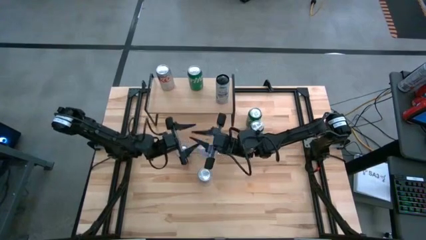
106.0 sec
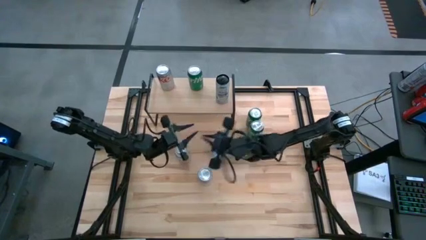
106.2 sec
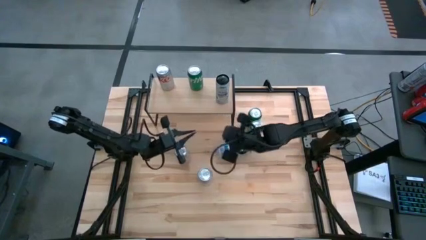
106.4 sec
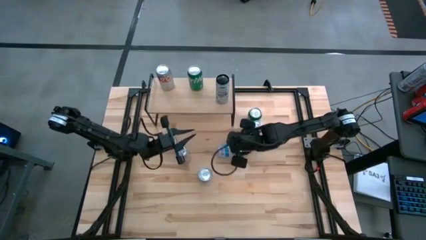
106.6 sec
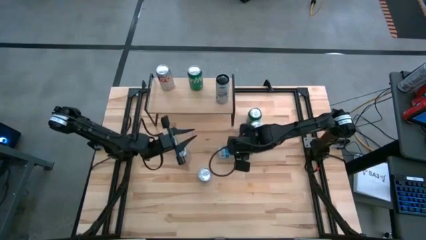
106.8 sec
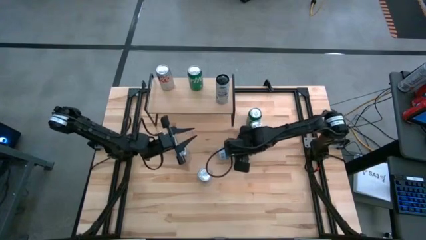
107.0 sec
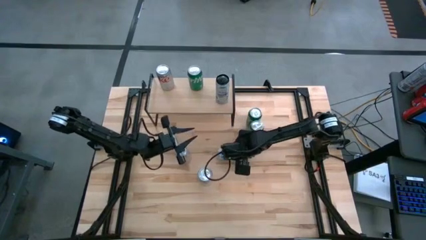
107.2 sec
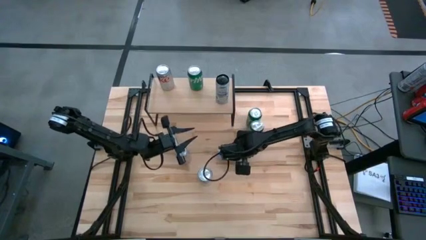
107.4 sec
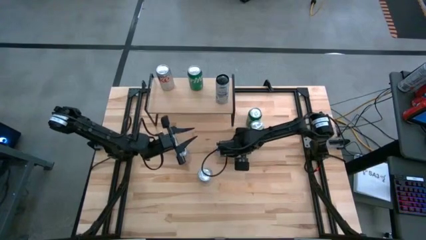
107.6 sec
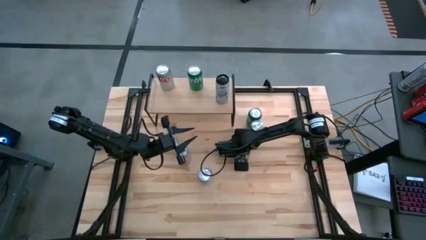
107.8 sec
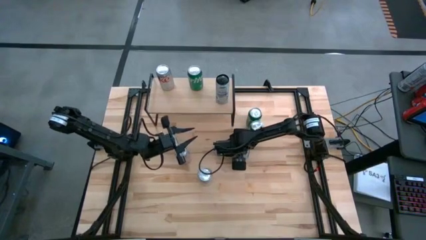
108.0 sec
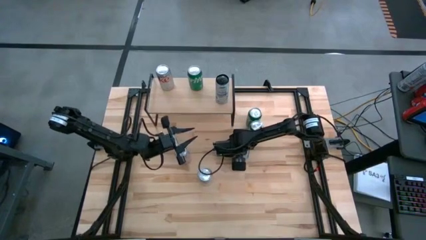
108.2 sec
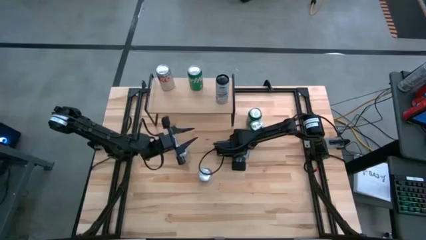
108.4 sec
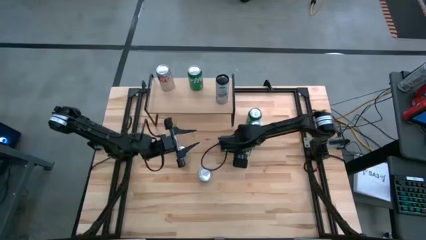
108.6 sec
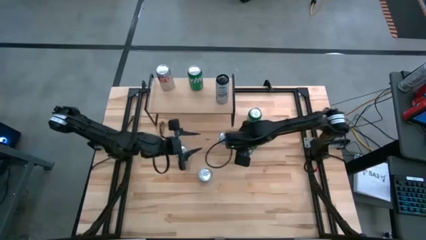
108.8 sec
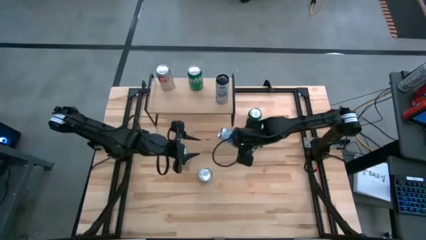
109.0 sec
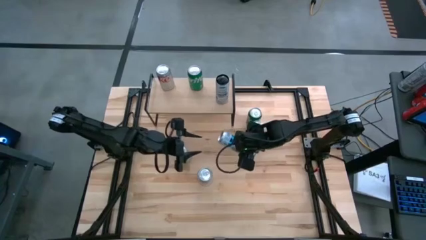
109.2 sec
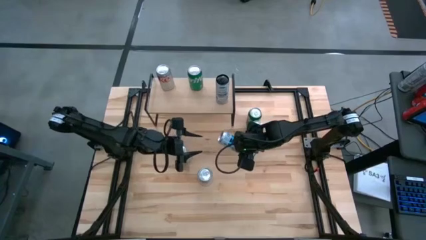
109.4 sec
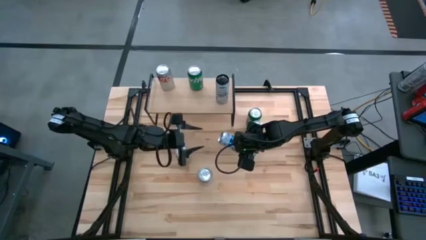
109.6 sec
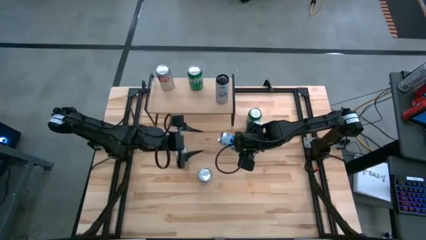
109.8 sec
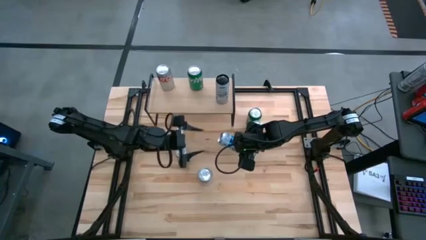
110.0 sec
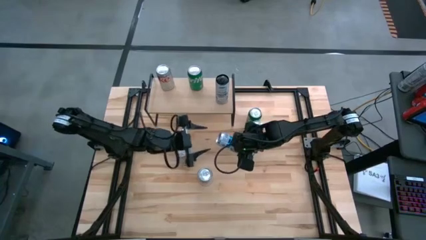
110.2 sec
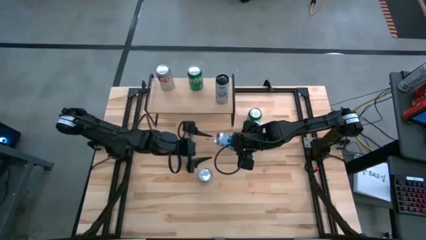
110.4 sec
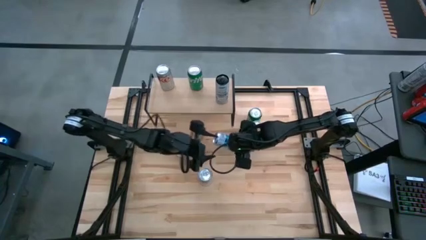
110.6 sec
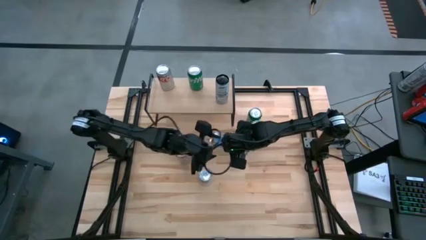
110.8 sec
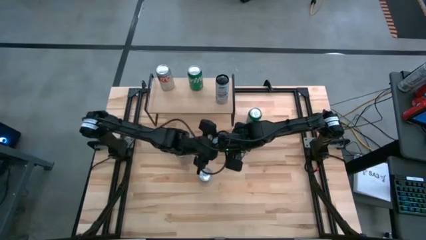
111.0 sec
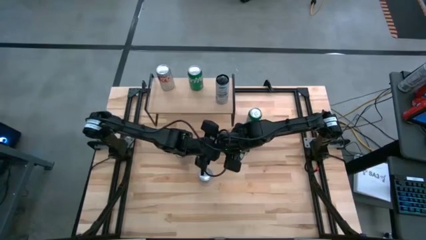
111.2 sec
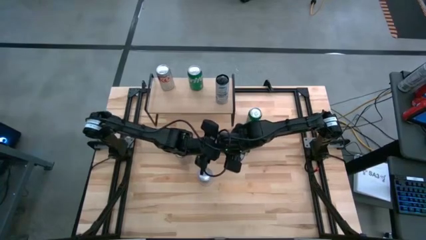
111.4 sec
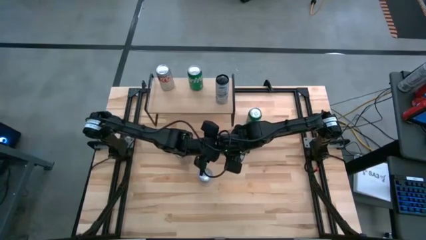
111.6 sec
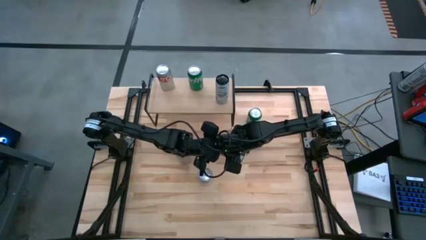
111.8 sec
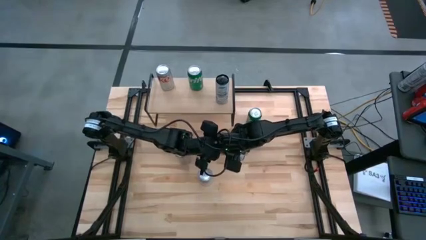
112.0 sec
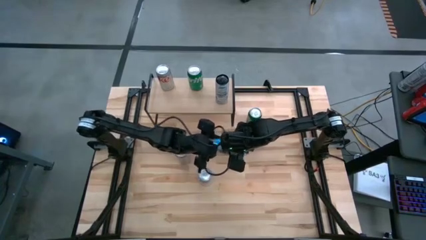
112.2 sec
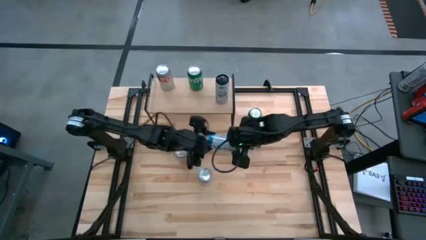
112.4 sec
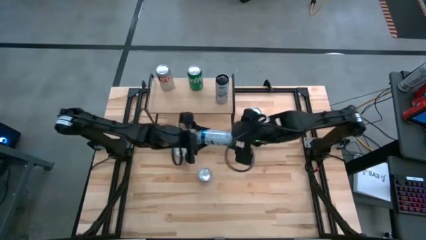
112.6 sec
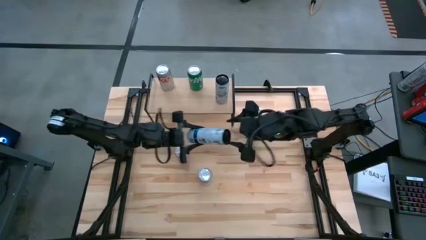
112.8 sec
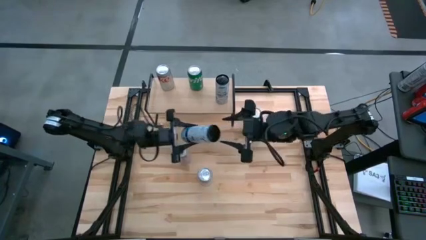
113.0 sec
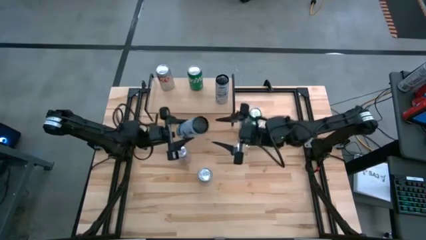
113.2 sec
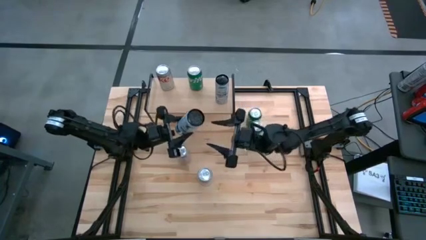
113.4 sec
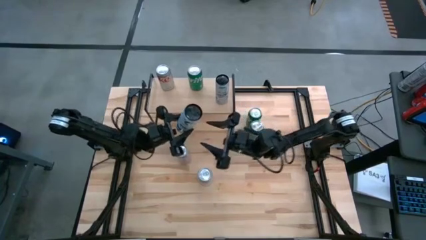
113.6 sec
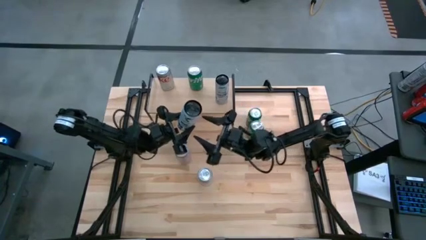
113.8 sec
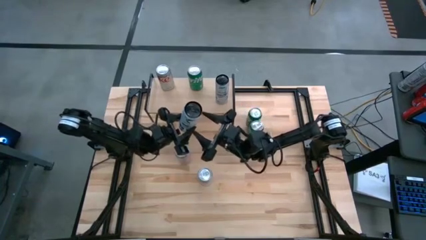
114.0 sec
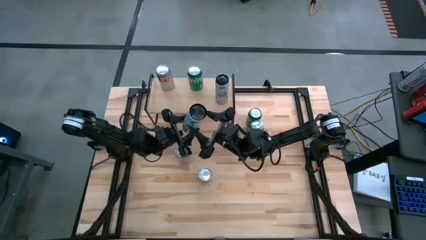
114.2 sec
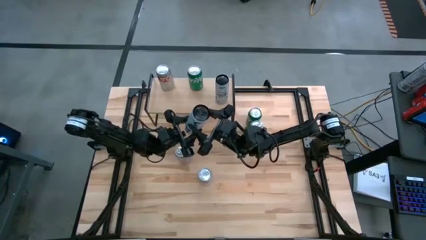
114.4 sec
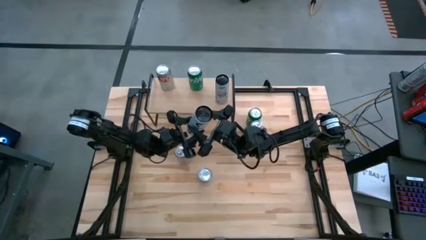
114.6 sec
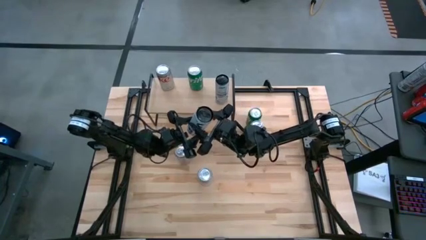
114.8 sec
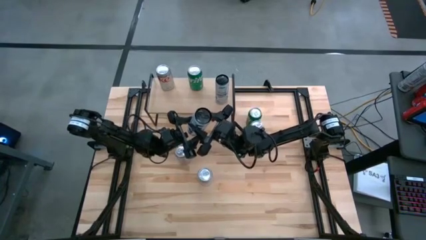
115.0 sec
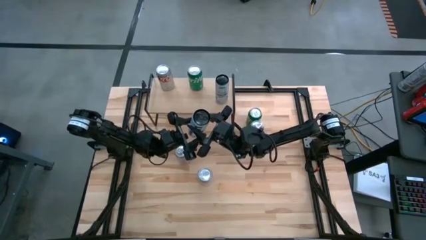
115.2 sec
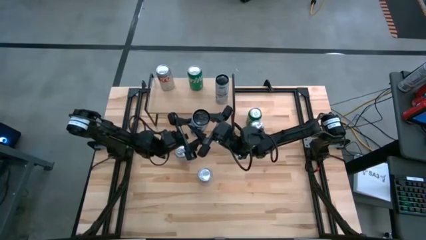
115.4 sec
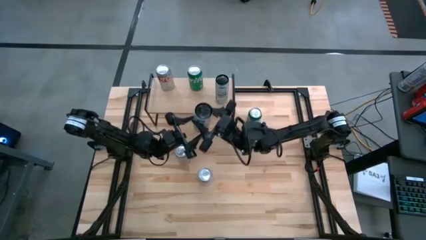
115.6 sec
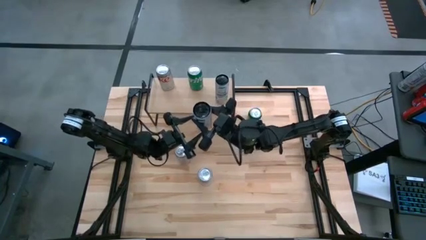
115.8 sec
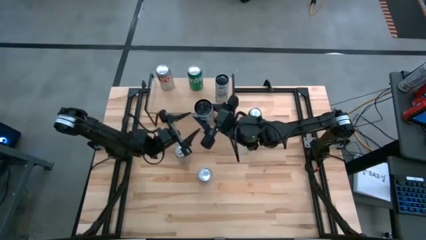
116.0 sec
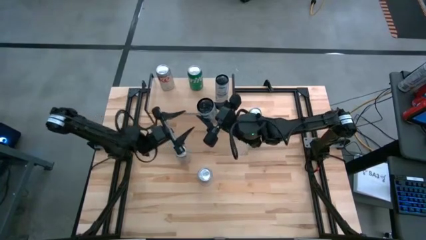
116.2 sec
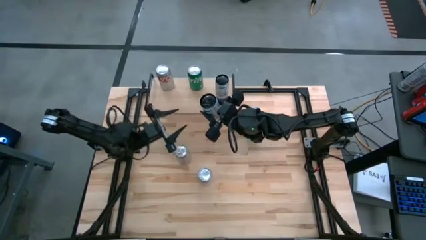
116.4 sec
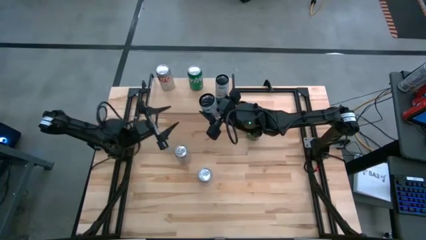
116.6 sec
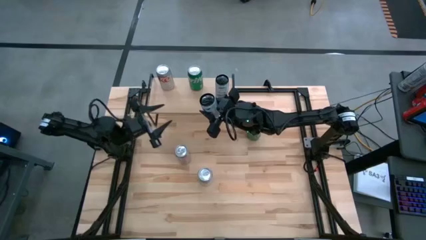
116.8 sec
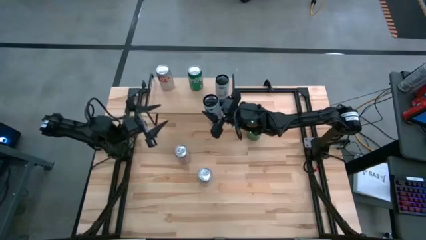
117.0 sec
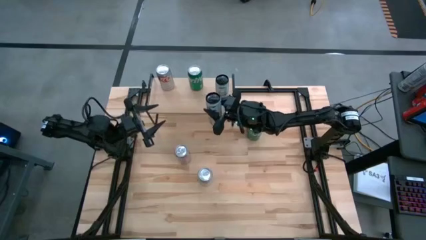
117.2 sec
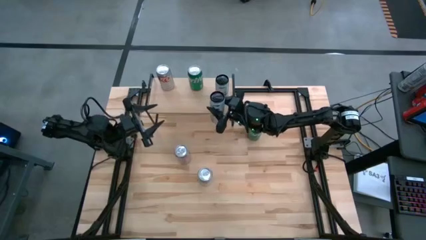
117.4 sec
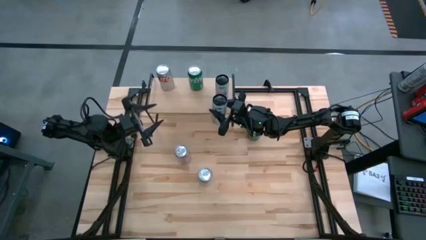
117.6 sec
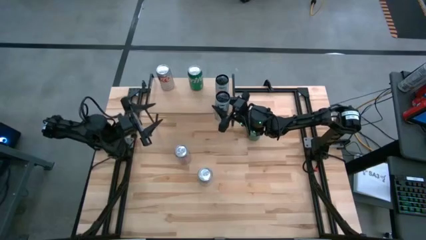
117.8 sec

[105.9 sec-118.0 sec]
Task: Place canned beverage on shelf
Put the white-blue soda can aligned with the other white-blue soda can on the shelf

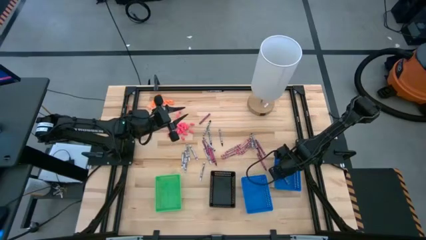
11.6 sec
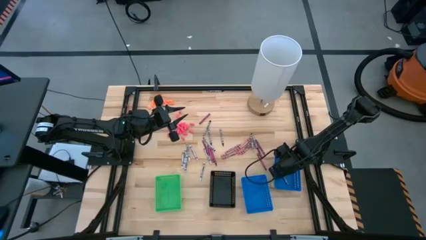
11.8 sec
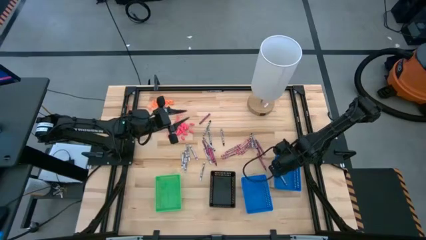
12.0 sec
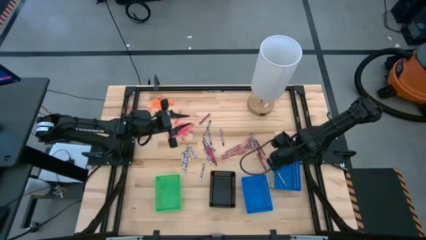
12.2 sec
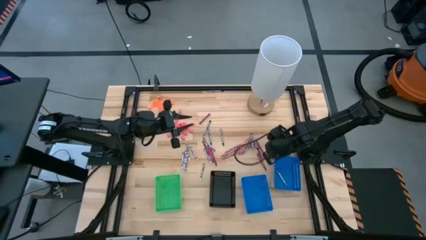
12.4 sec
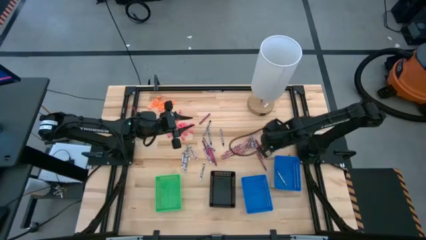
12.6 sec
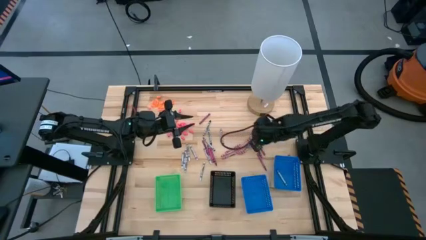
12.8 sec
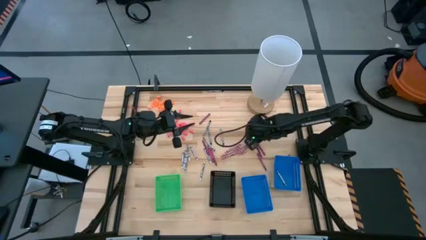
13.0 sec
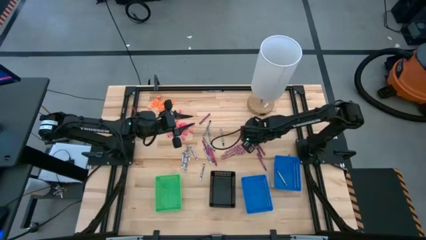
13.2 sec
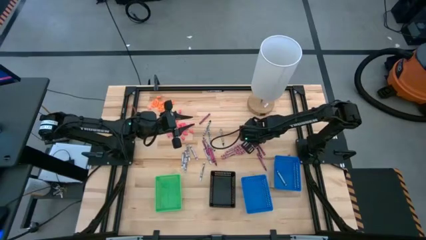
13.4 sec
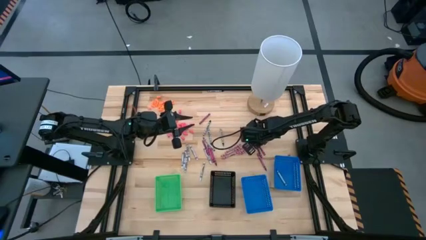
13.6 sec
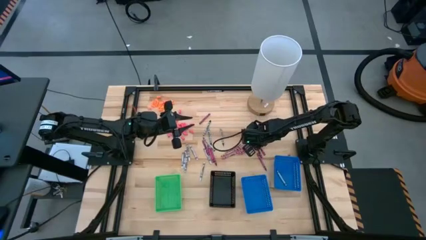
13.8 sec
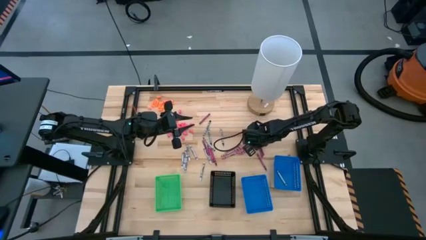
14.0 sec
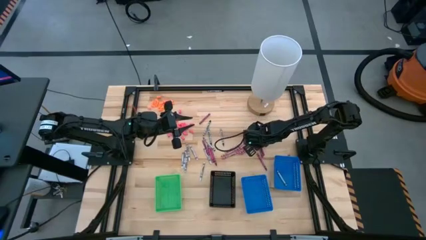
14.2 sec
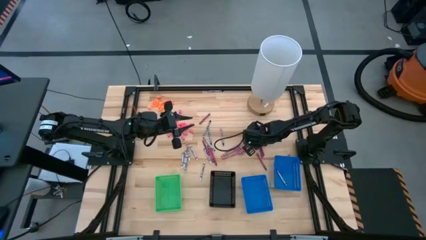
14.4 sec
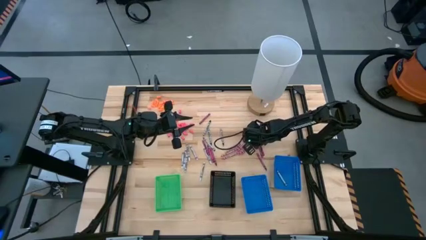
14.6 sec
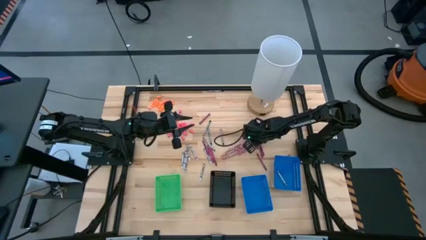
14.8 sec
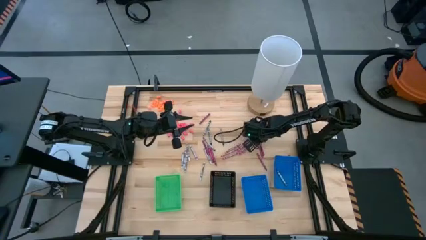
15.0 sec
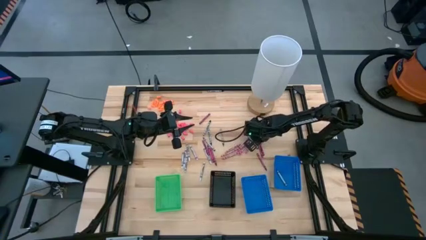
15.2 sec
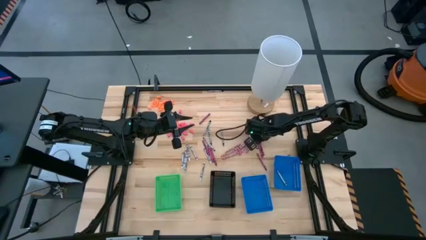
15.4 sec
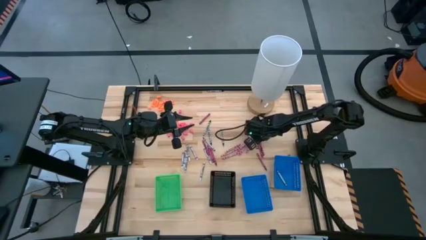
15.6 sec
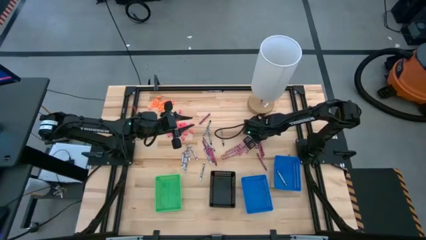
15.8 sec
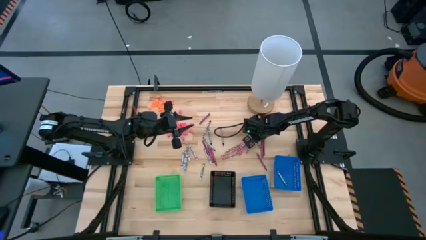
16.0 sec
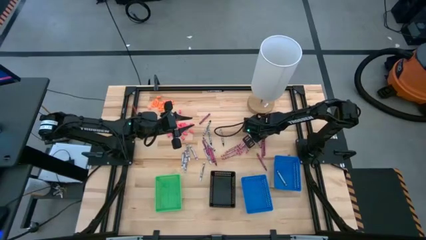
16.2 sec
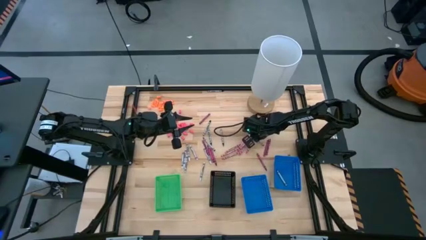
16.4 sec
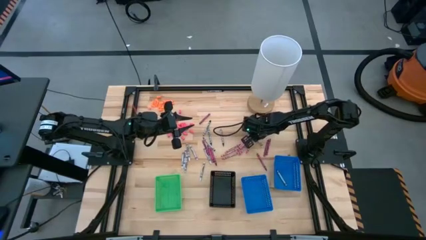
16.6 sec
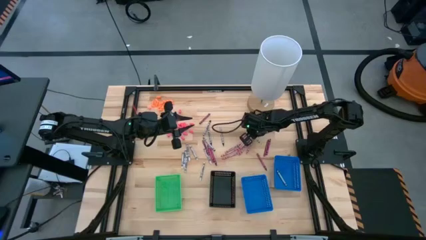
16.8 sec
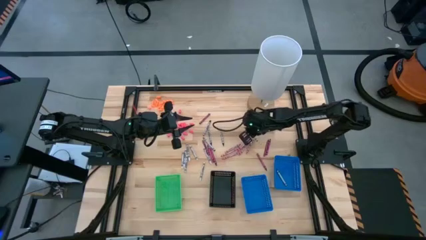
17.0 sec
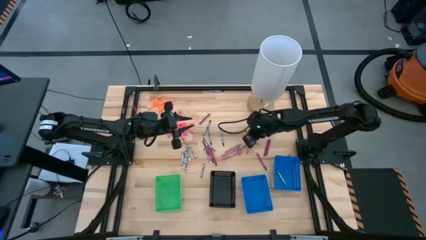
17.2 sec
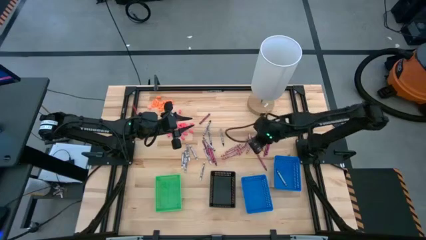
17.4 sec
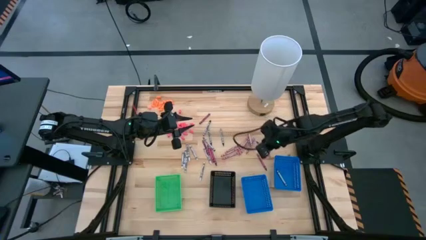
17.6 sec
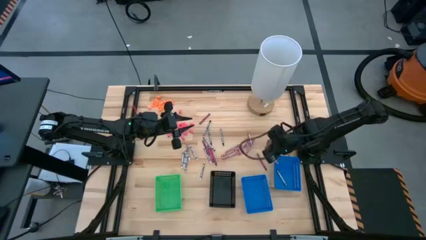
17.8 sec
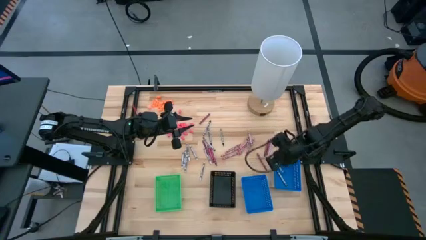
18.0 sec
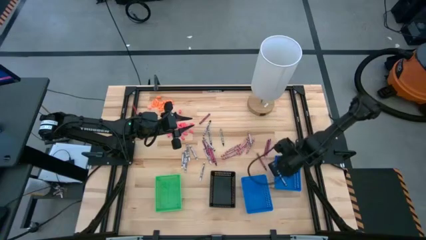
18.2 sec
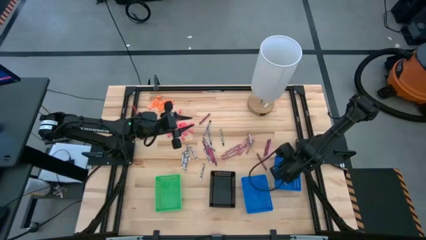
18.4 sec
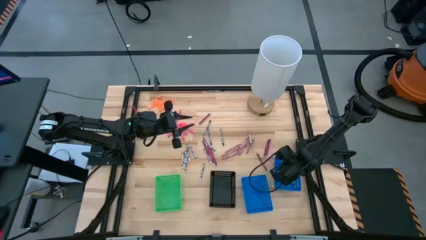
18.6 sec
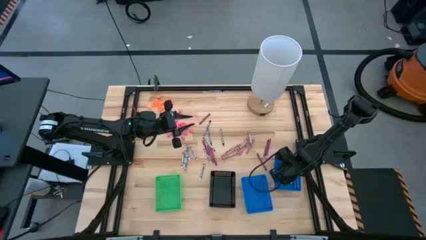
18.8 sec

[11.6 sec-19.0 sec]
Task: Sort crayons
Put the black crayon into the right blue bin
